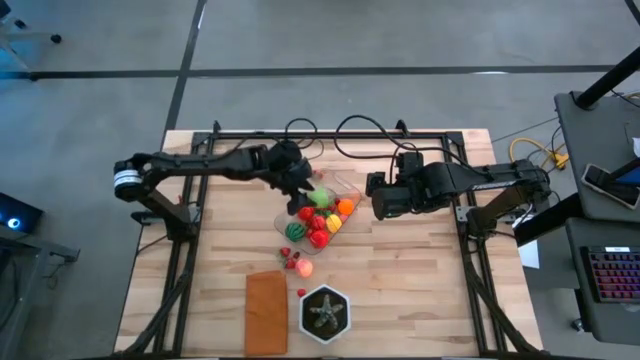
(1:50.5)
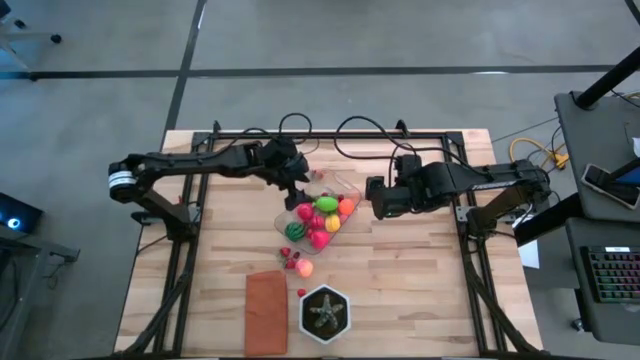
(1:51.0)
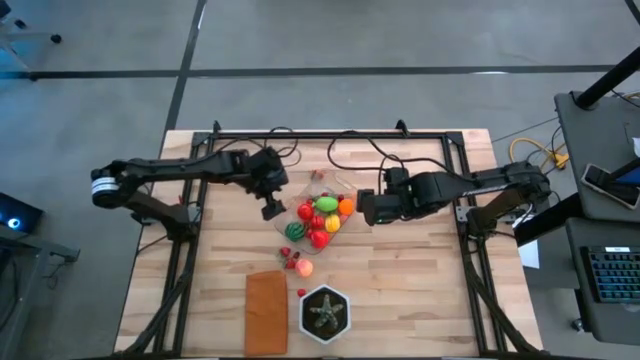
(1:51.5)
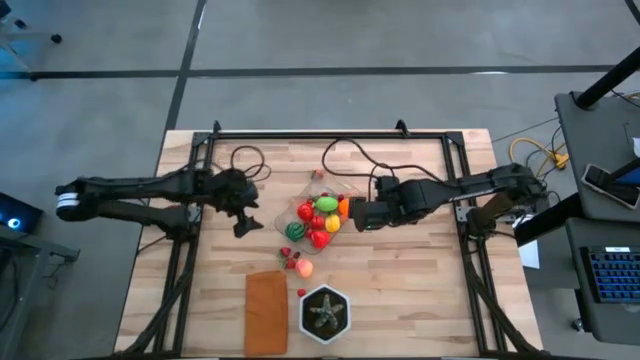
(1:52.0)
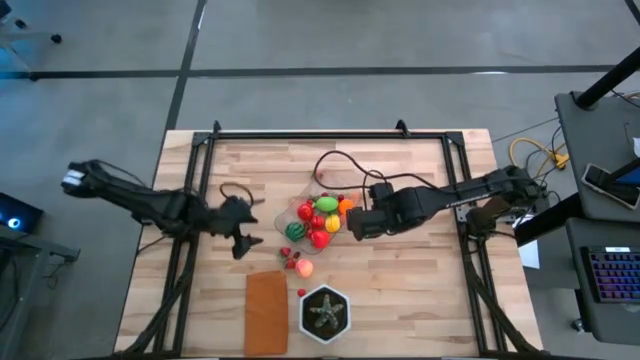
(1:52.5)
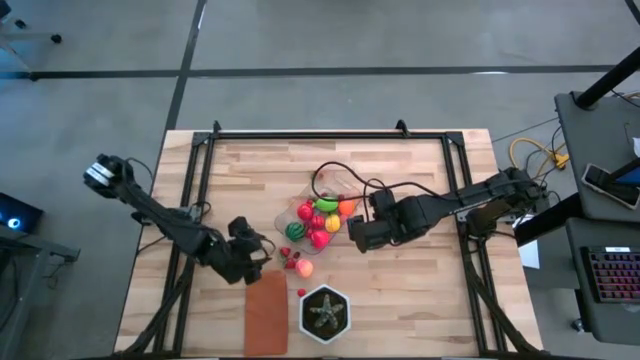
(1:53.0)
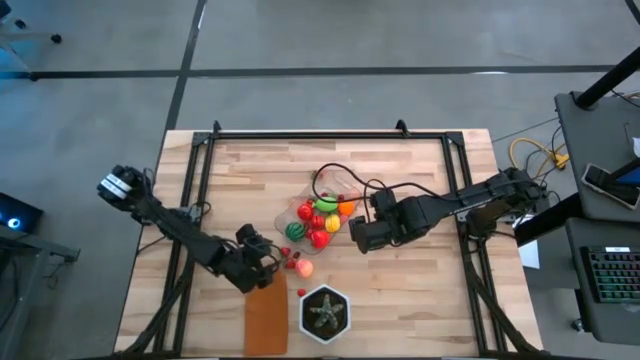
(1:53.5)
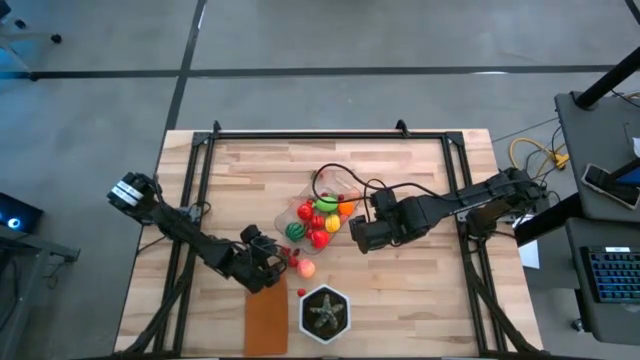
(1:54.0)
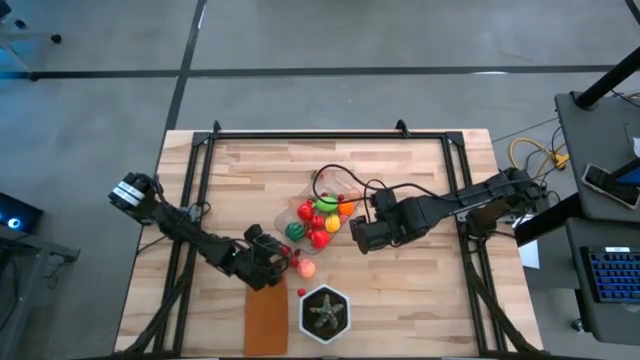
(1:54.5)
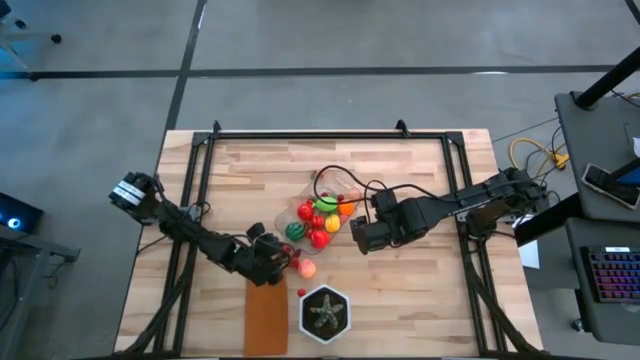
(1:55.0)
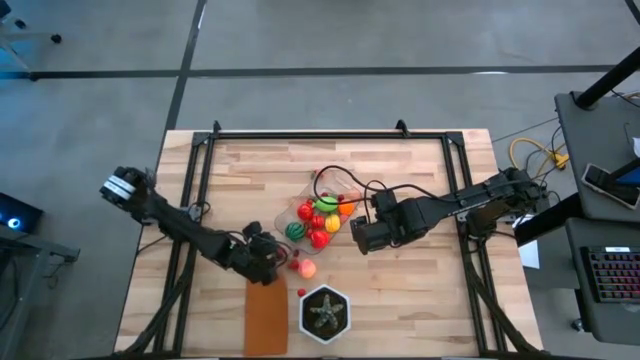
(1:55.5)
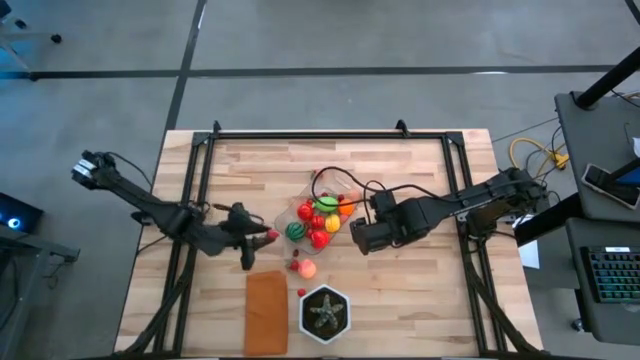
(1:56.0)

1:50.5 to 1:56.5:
Task: Pick and placing Produce into tupperware
Put the red strawberry into the transparent bin

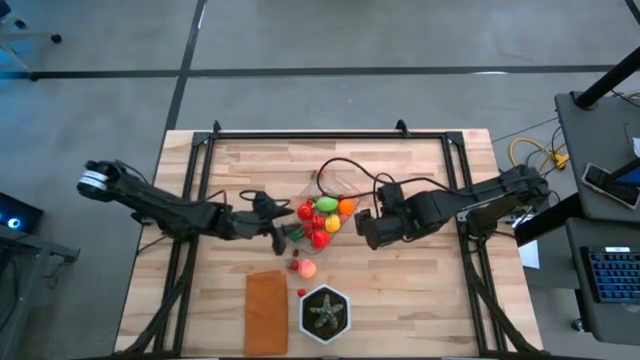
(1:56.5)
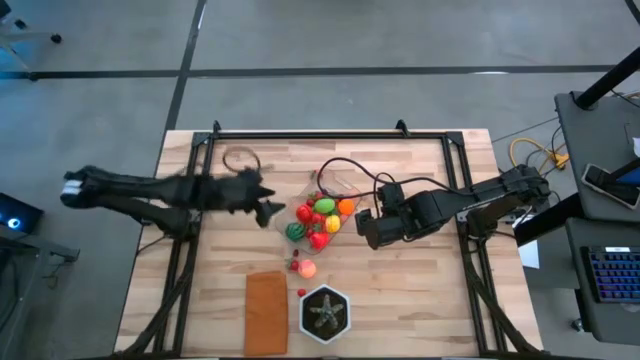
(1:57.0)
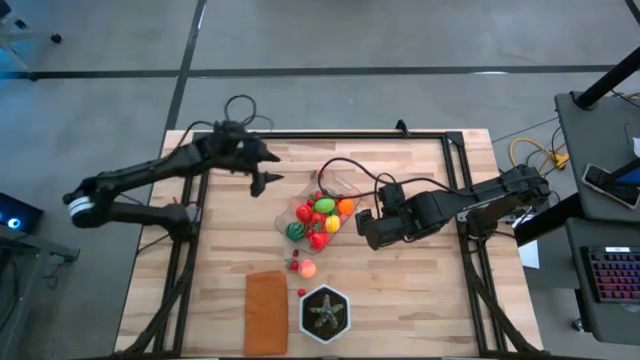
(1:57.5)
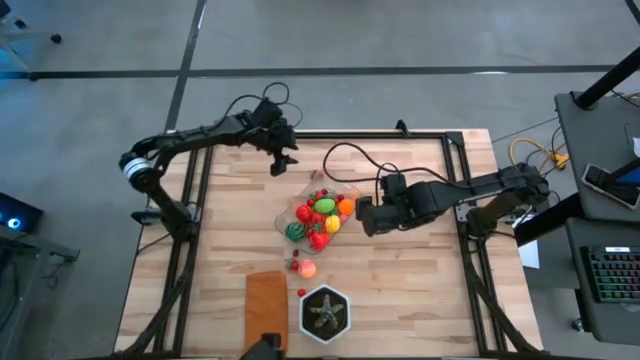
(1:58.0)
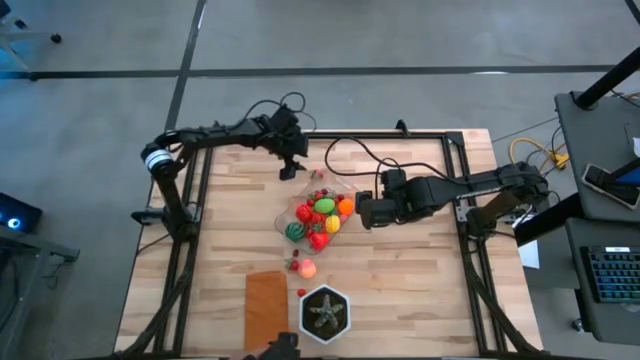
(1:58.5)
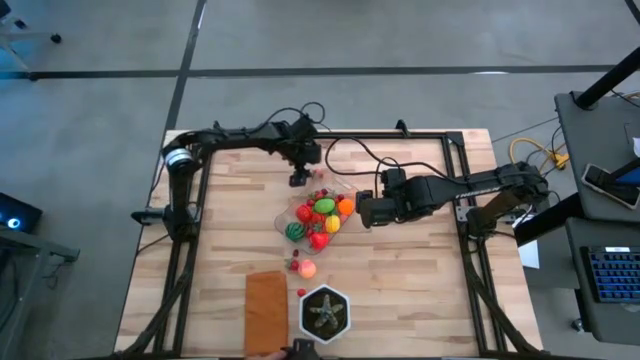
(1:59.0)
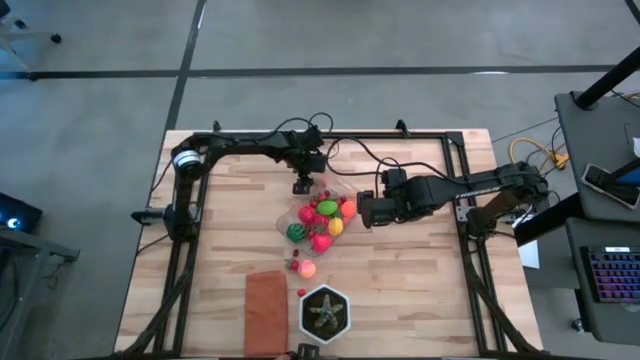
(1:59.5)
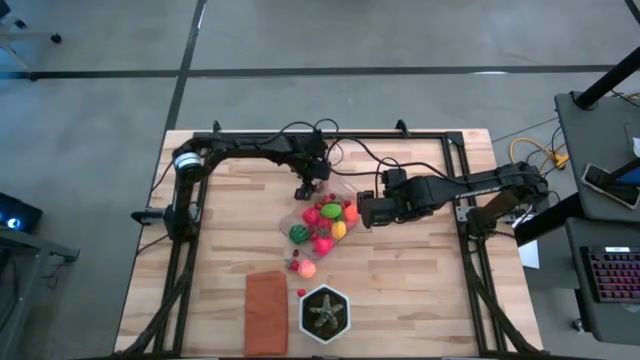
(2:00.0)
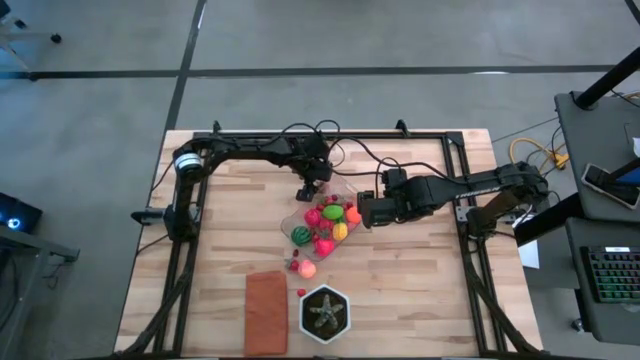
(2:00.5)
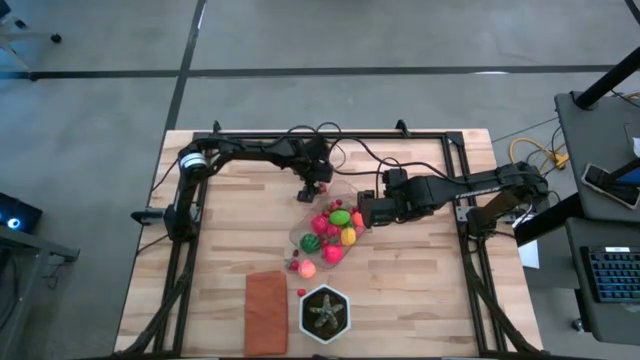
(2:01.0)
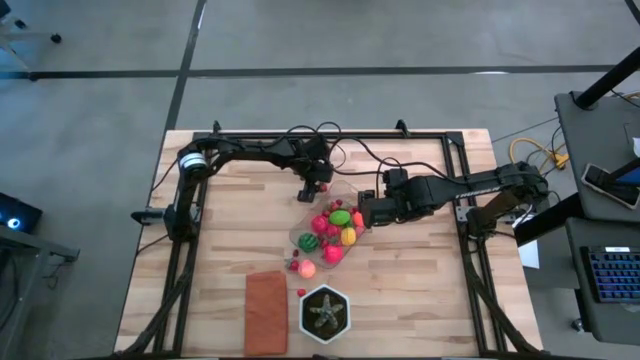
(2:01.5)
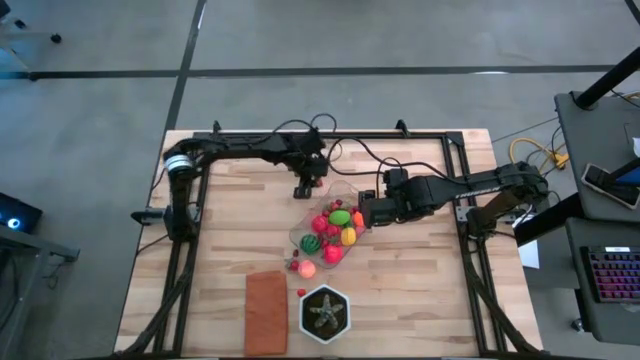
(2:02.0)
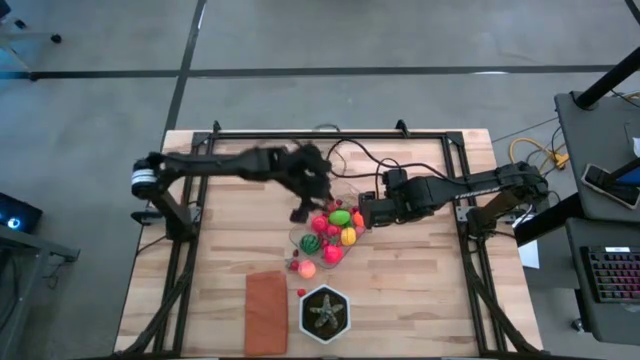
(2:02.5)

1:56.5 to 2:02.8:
Put the red strawberry into the transparent bin

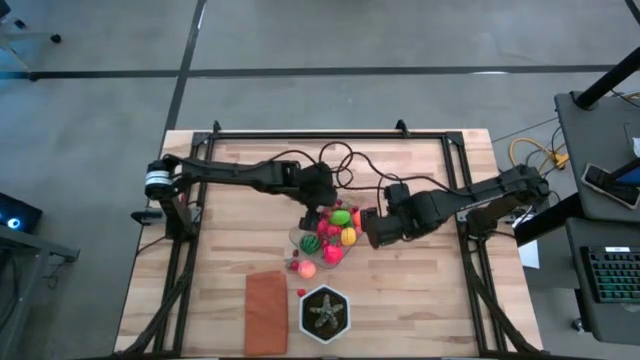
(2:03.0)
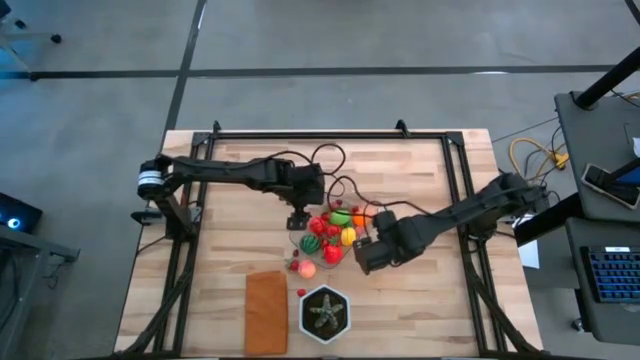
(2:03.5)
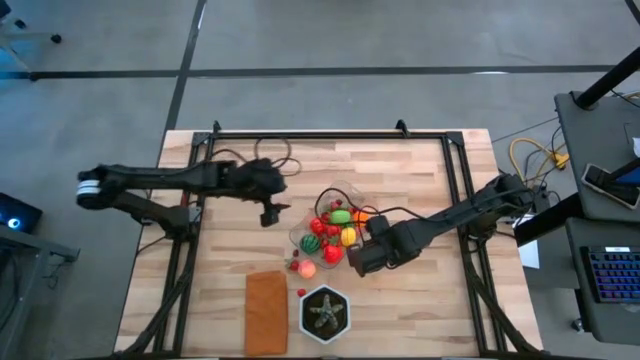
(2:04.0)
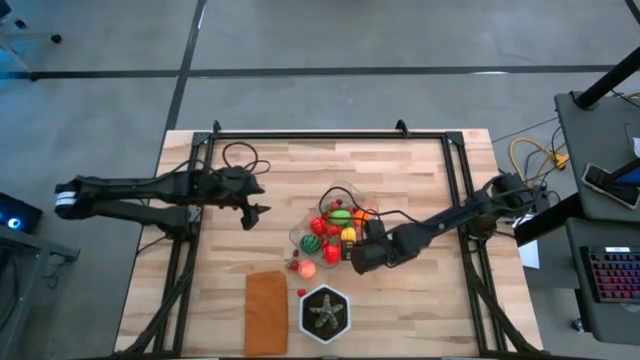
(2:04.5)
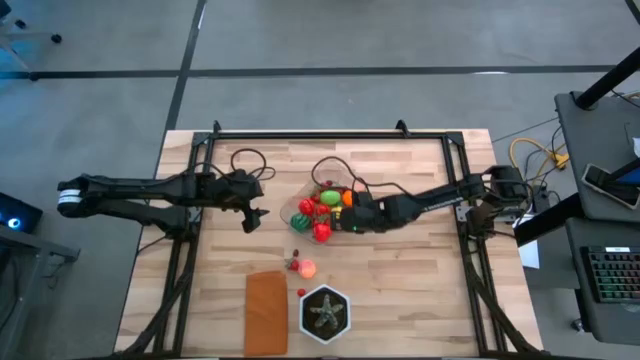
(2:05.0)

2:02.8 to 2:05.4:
Adjust the transparent bin on the table

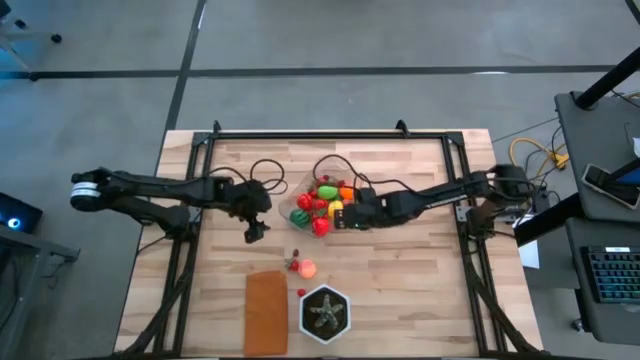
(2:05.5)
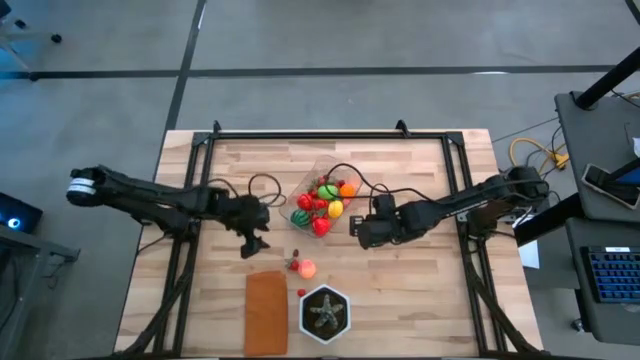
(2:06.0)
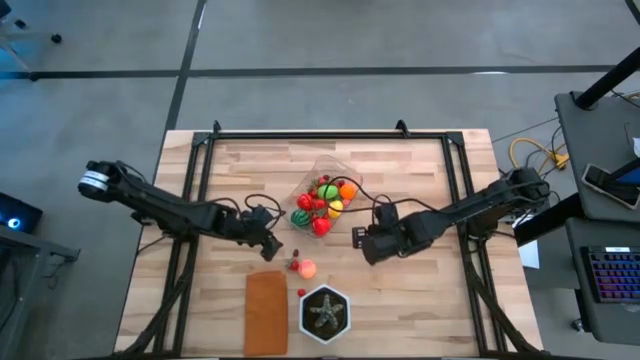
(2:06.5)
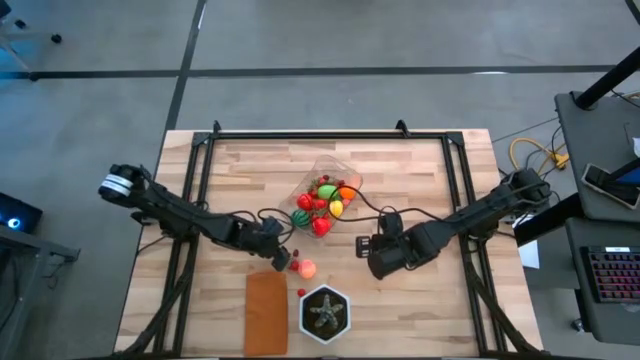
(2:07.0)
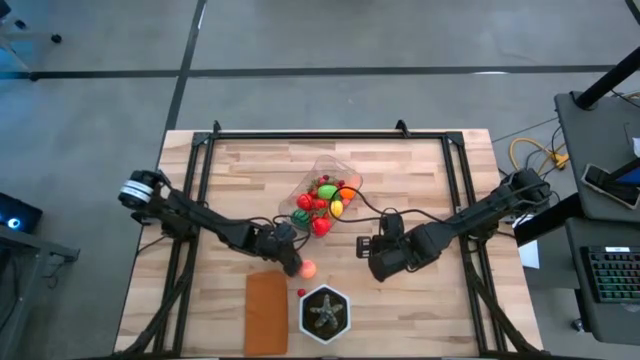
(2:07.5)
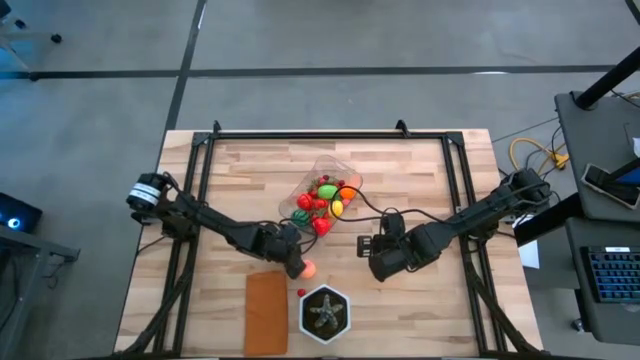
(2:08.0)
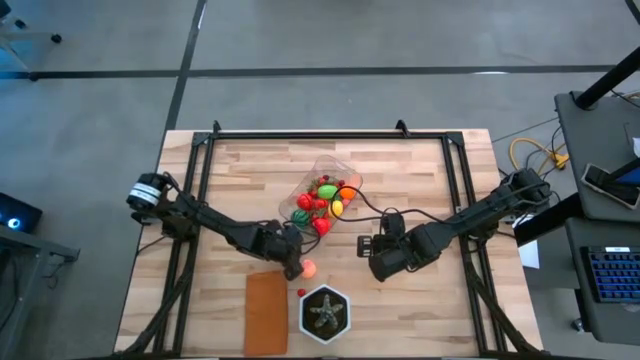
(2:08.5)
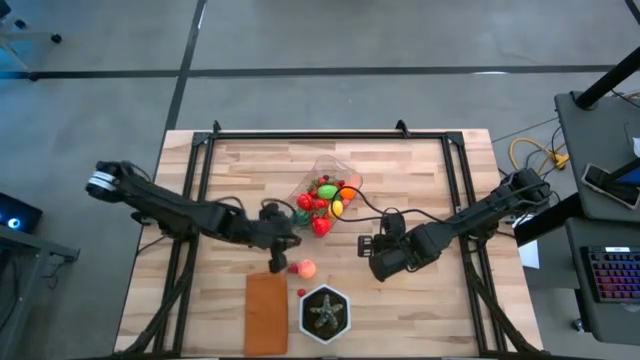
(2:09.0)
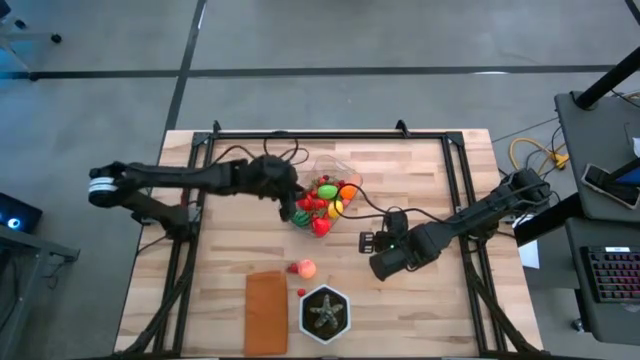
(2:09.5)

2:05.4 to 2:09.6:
Put the red cherry into the transparent bin

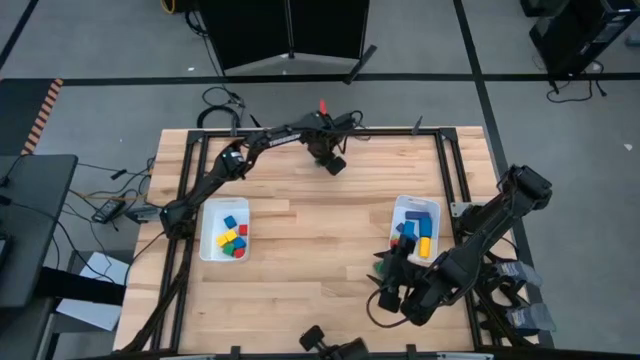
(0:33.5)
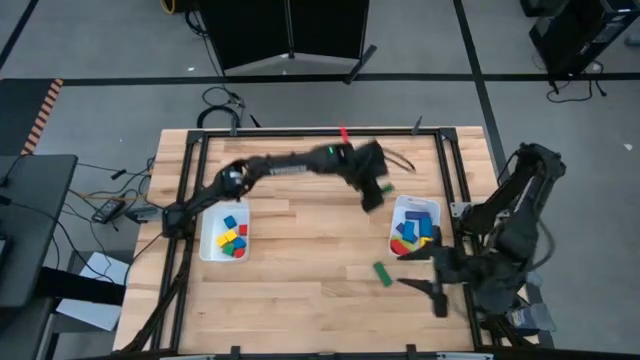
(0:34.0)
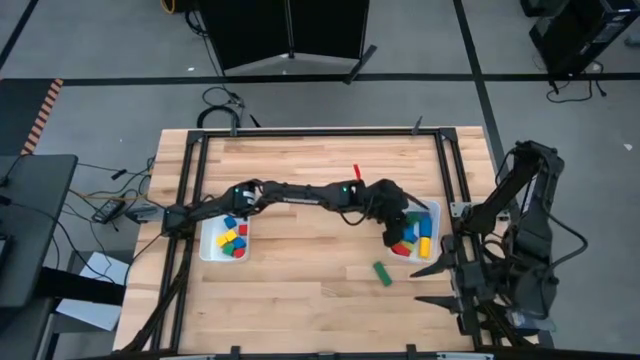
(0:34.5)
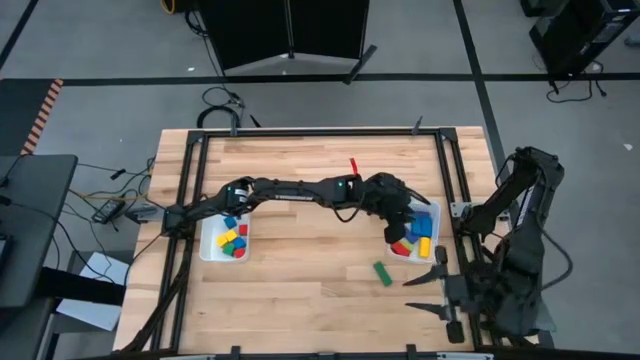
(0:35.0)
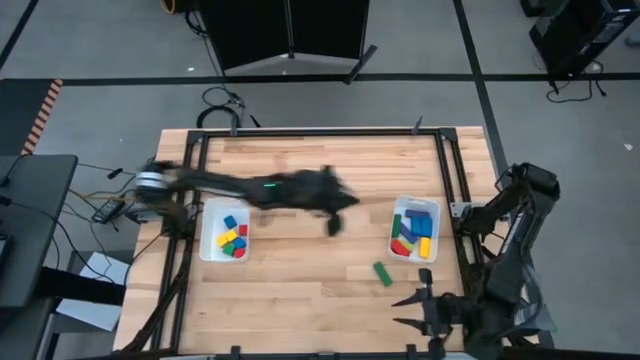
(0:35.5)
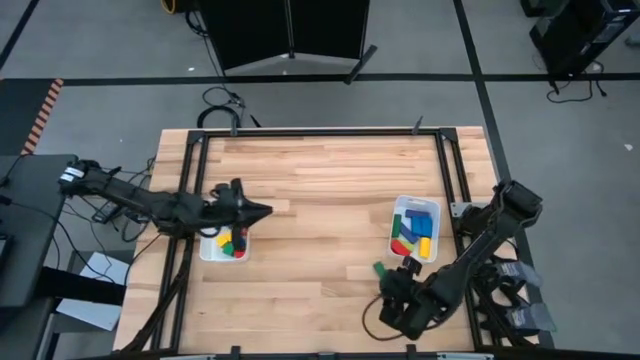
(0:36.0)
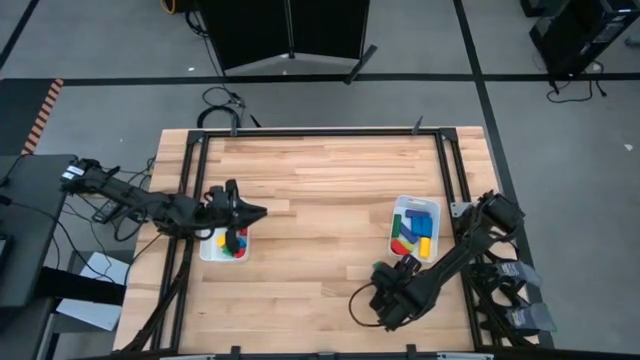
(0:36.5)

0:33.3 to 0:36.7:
Task: Sort blocks by size
Put the green game piece into the right bin

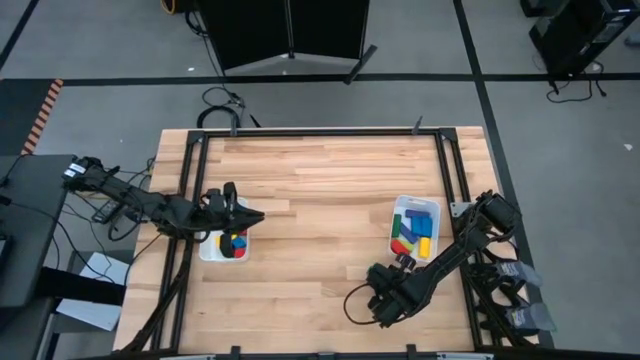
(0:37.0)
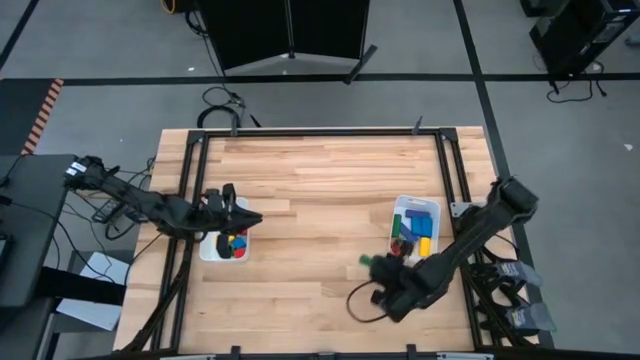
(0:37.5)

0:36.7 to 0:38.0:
Put the green game piece into the right bin
